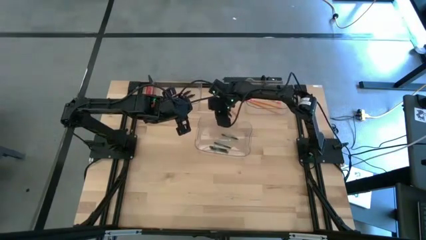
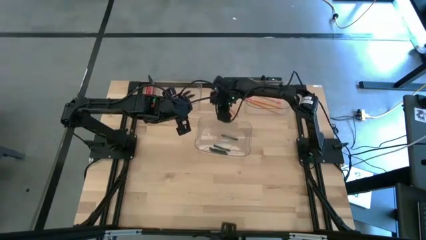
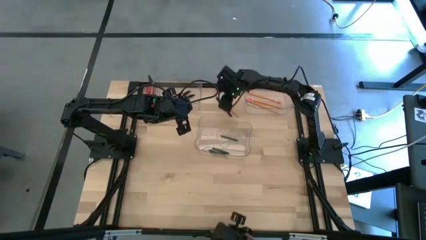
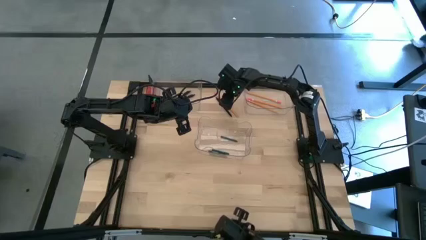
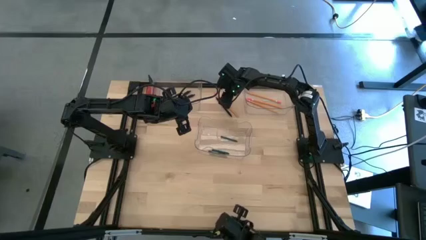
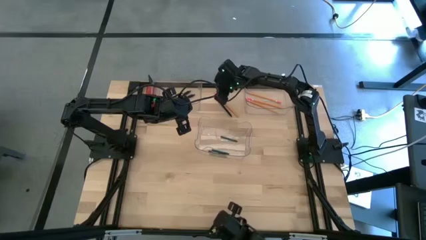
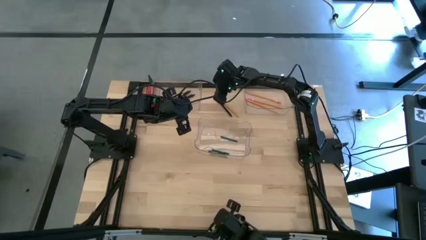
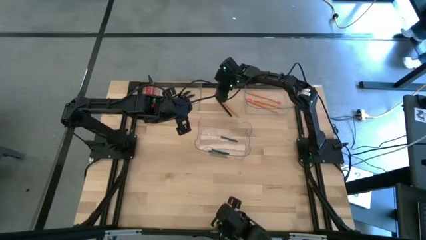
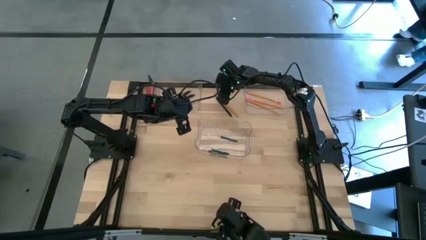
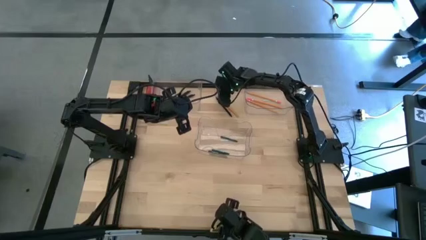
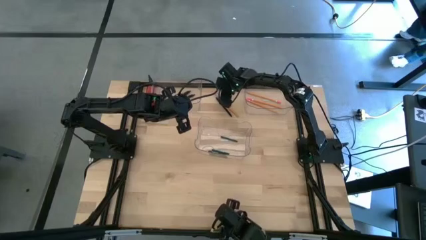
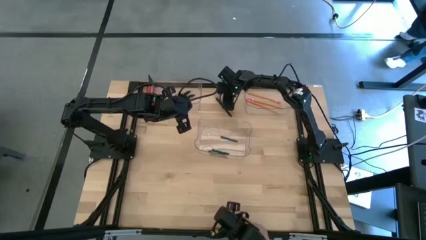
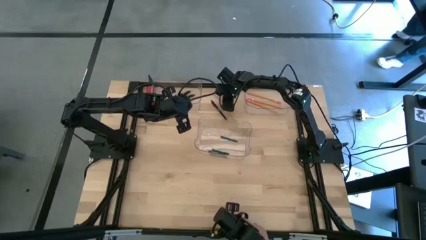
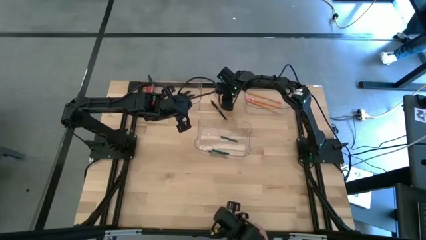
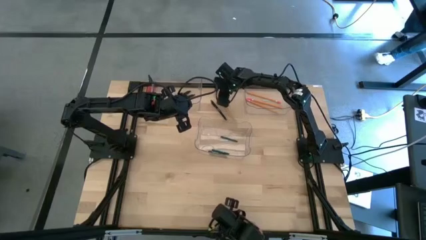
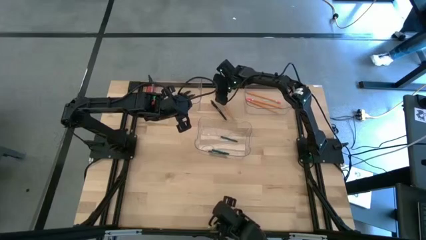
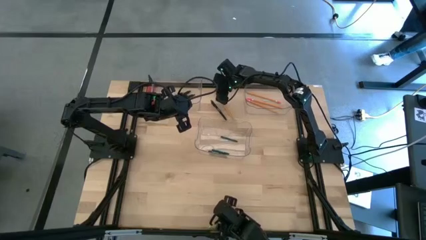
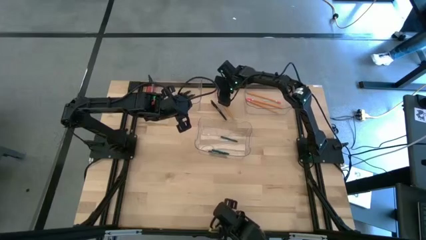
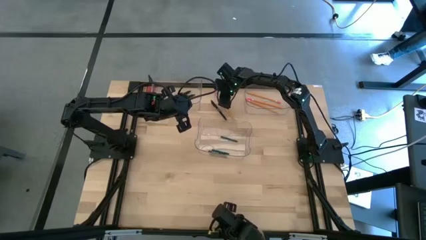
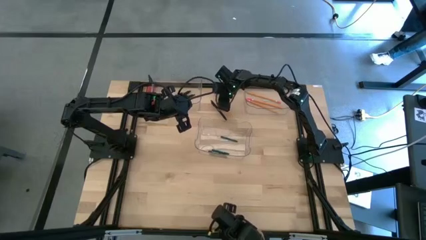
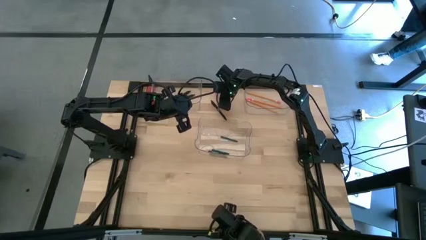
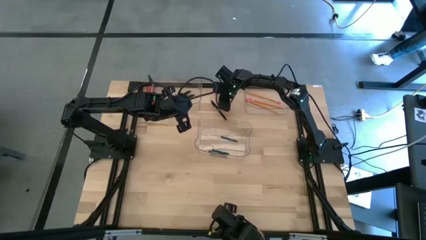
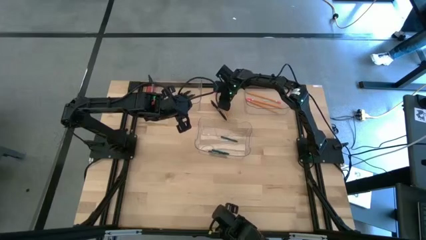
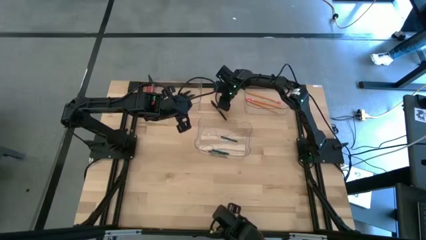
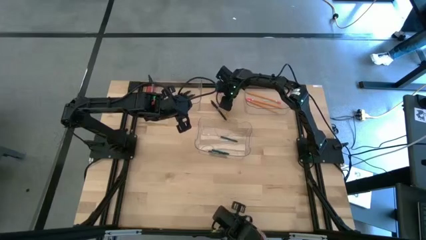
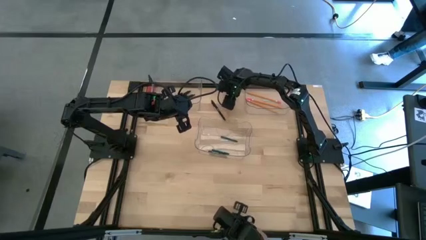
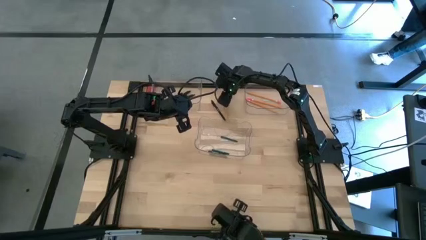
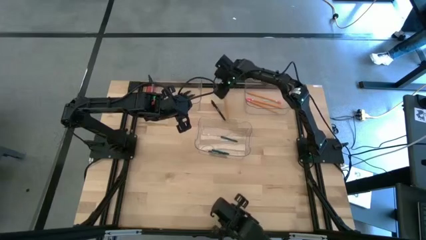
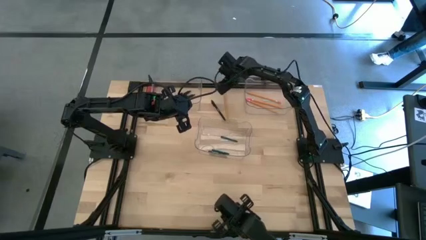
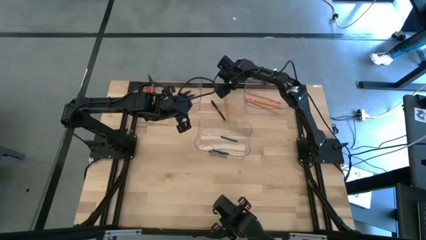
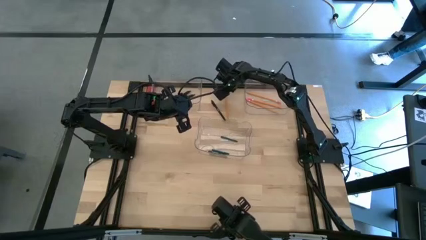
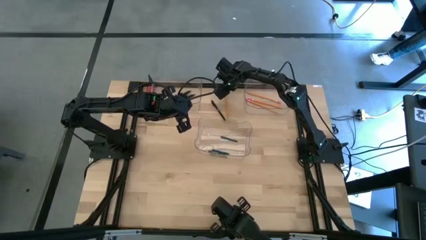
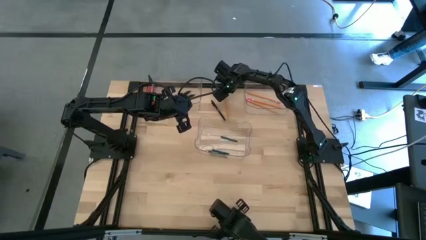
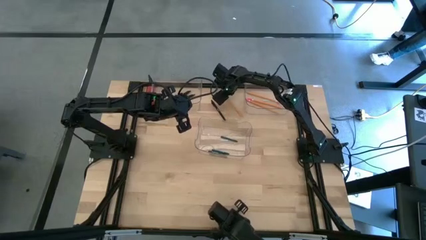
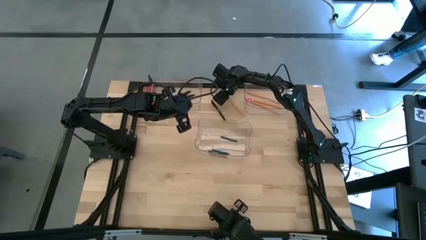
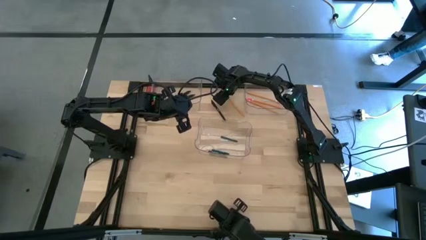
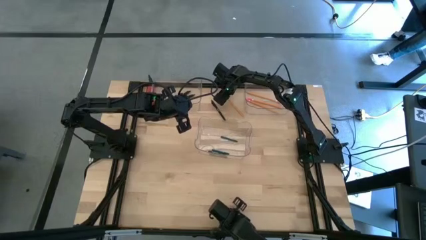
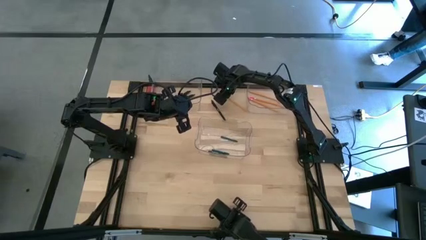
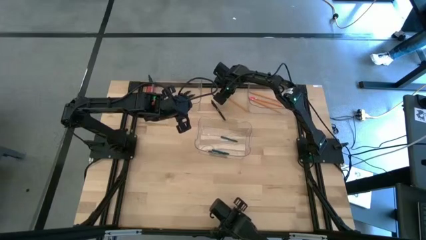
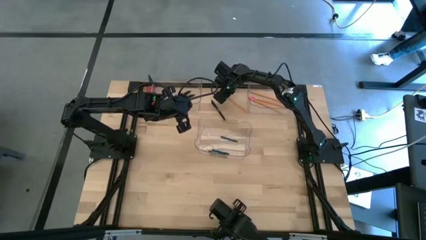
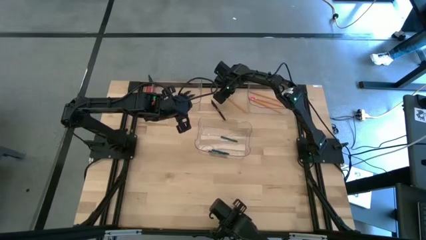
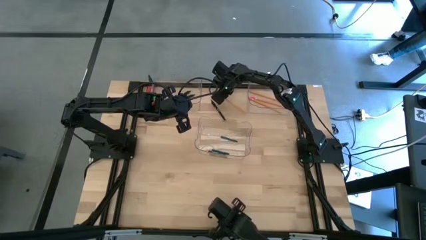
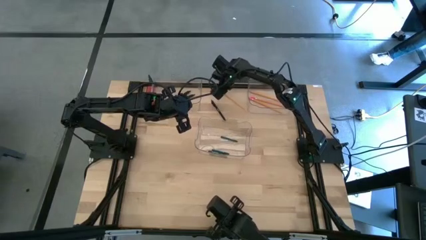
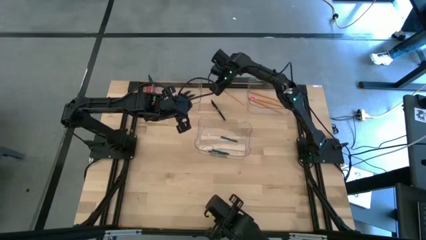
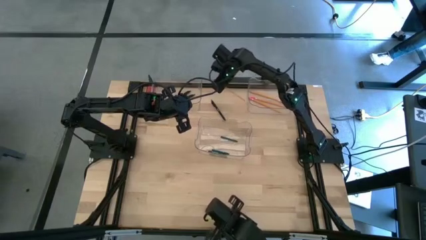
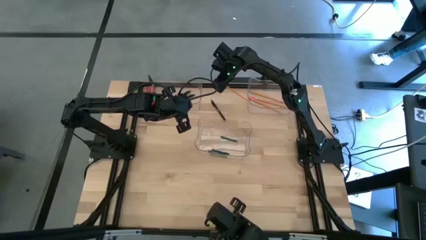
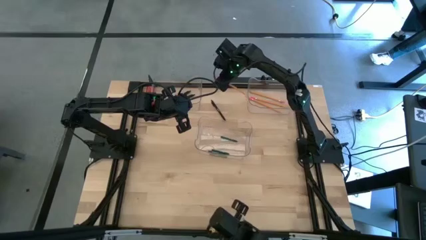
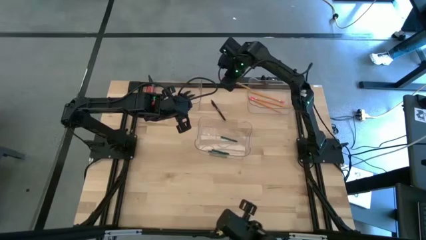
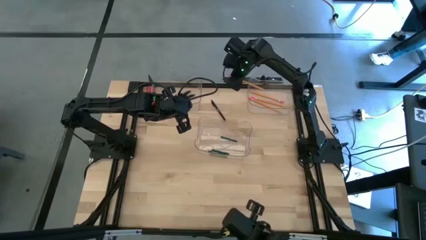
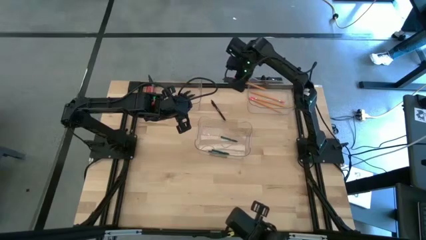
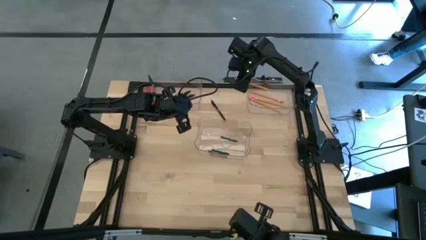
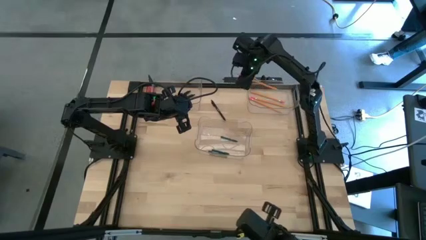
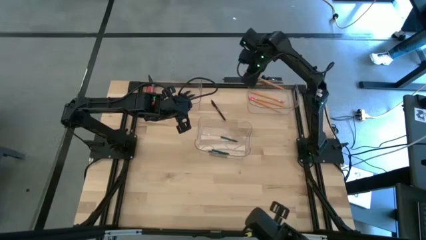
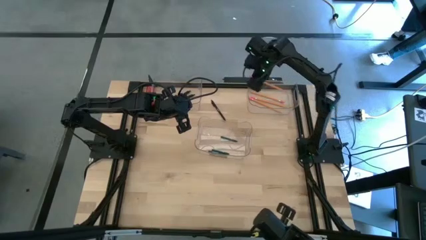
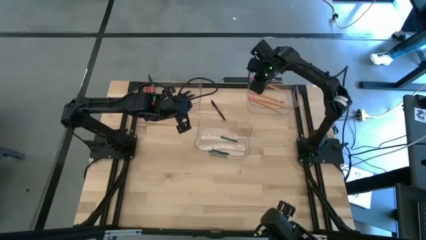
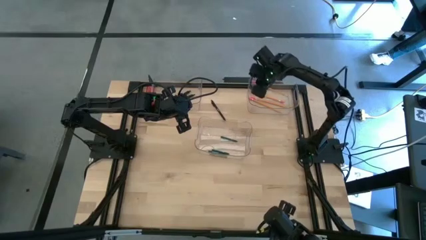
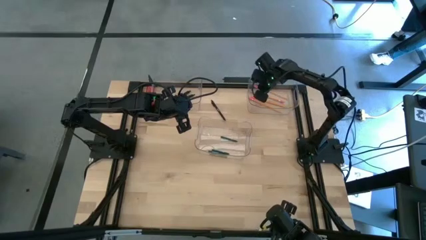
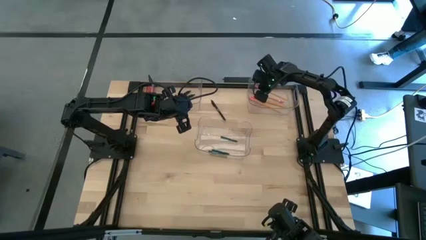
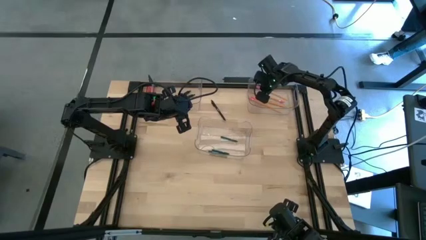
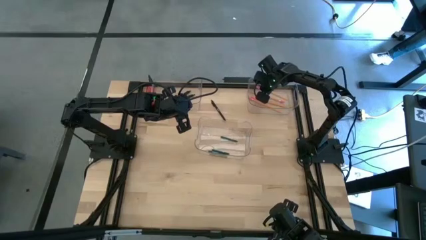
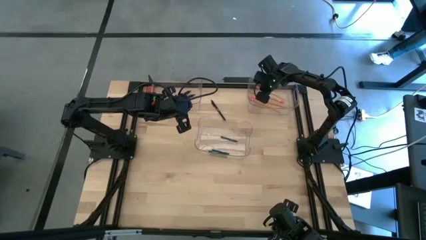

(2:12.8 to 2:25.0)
Task: Sort crayons/erasers/pens/pencils in bins
Put the orange pencil into the top right transparent bin

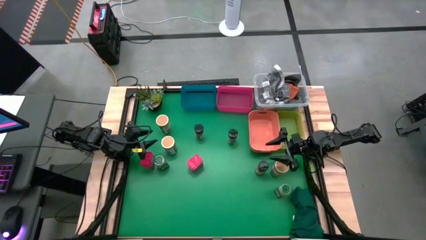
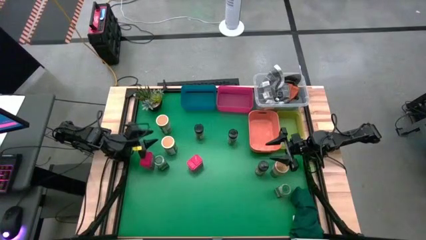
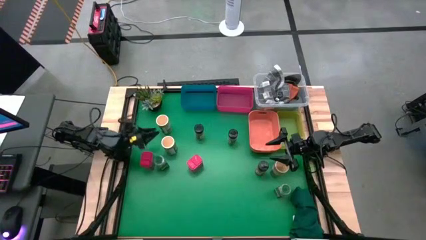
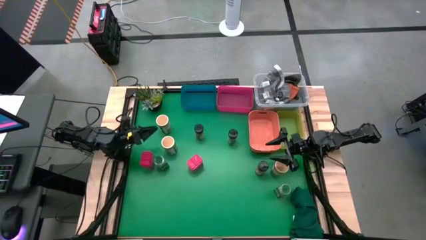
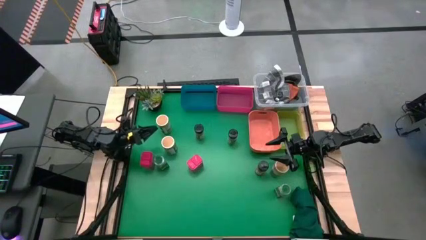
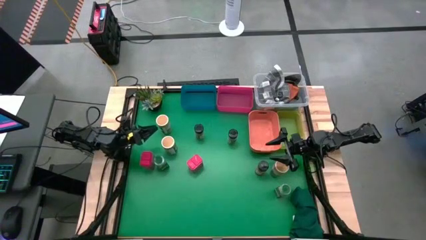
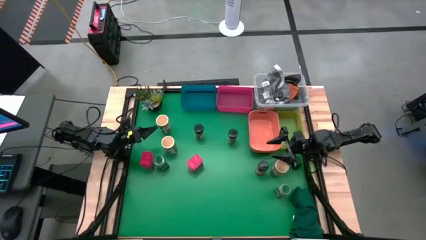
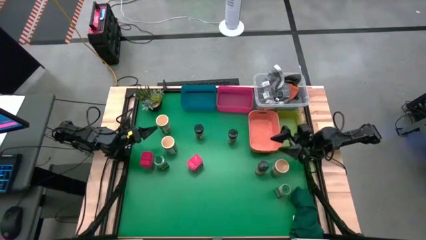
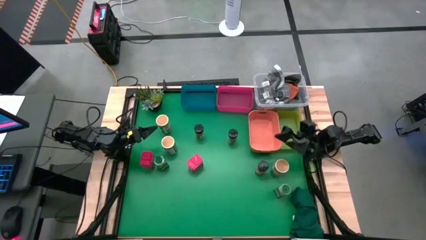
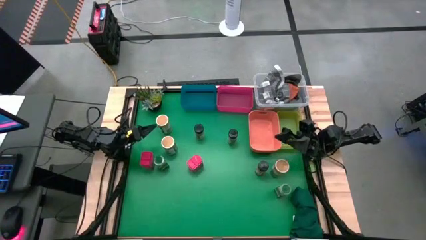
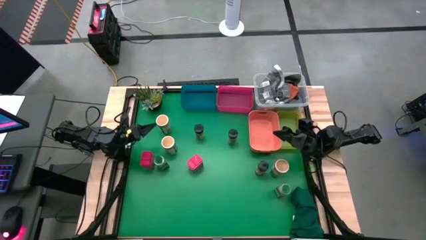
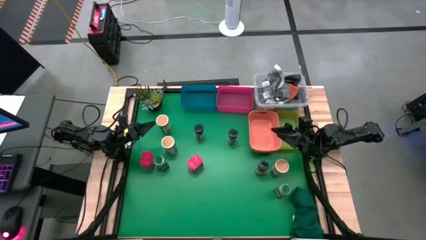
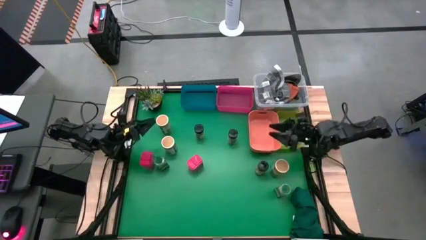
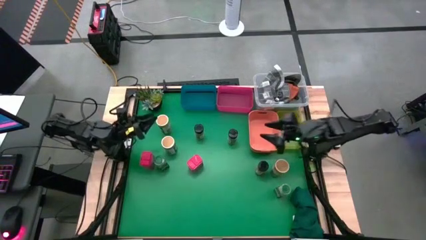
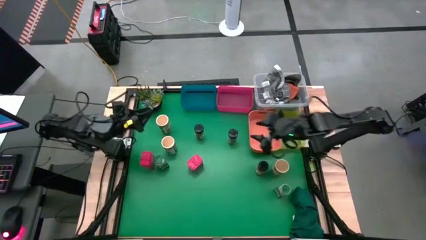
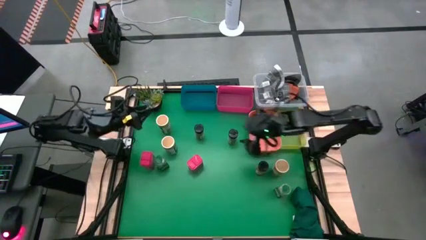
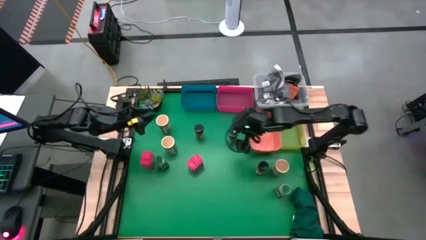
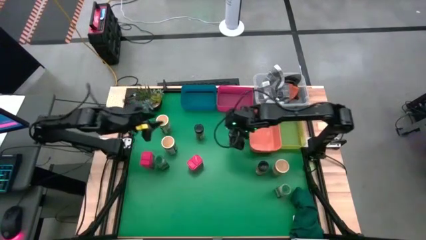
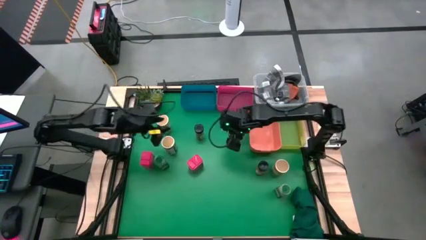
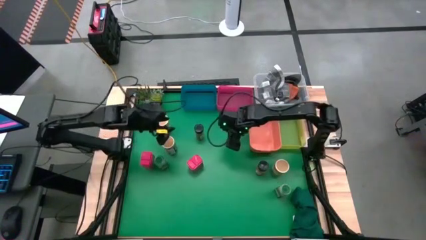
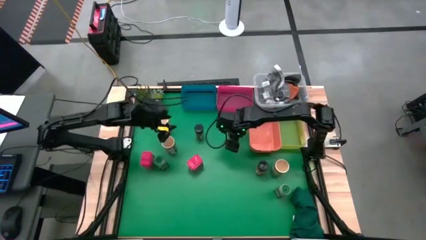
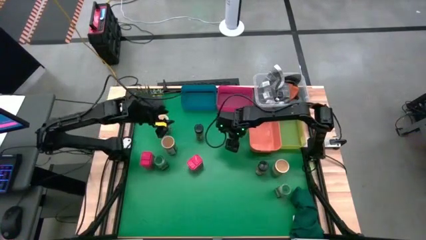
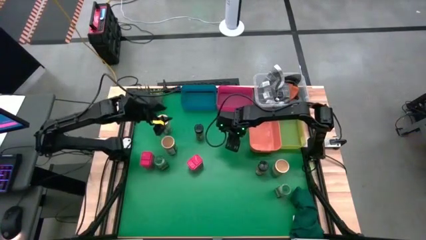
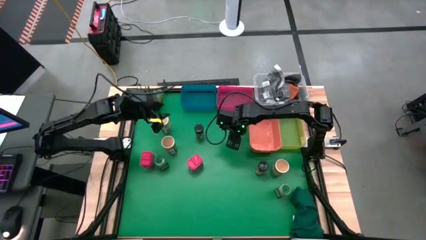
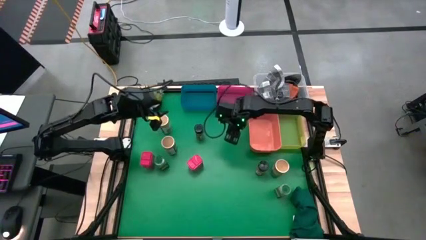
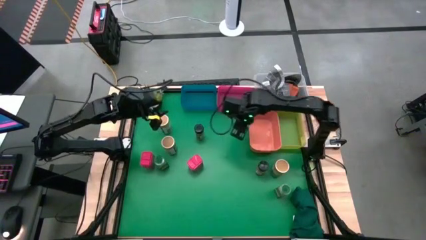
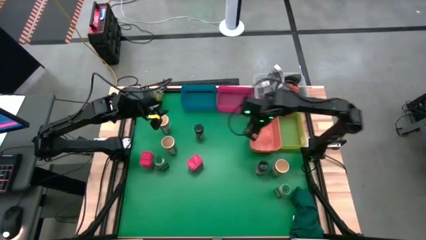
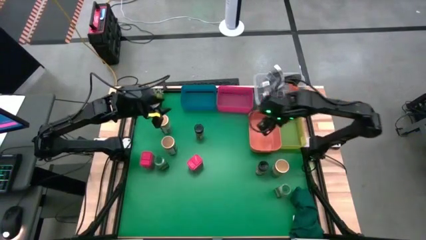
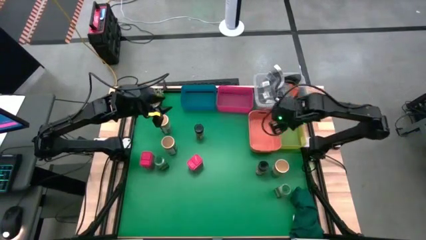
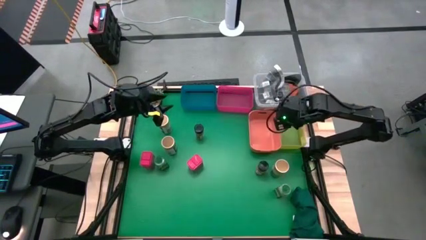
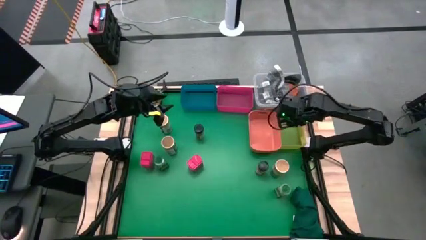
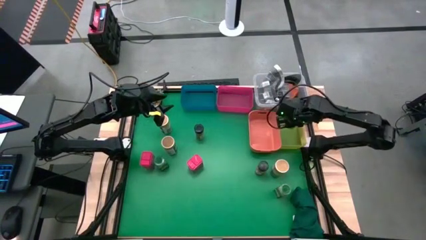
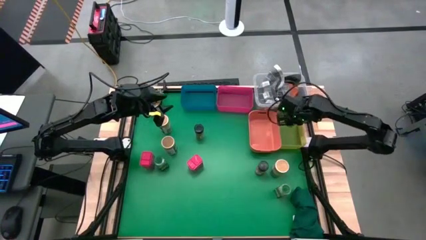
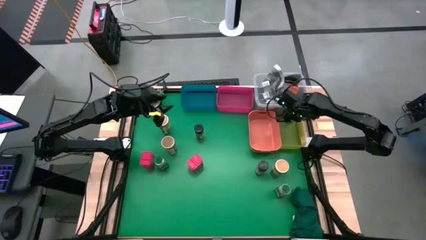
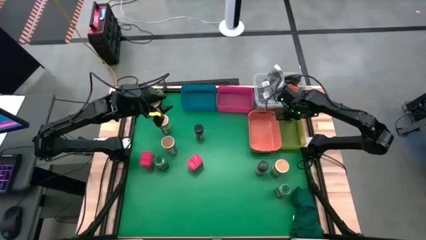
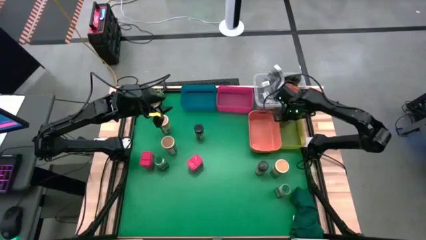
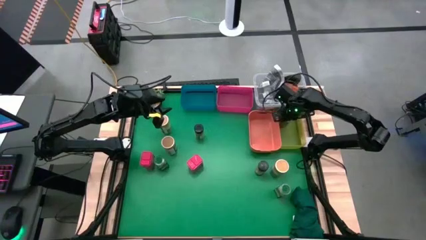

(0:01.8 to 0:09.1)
Task: Sort spices by type
Put the middle top black seasoning bottle into the yellow bin
